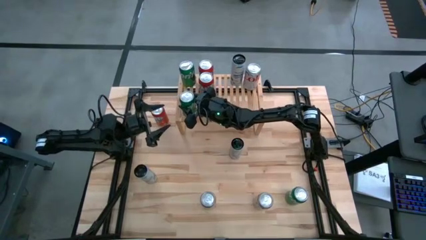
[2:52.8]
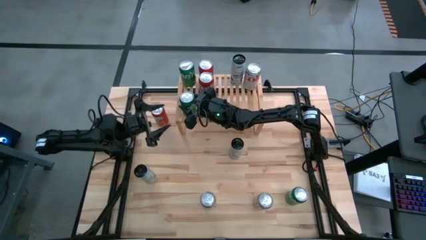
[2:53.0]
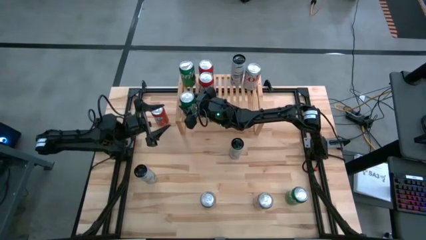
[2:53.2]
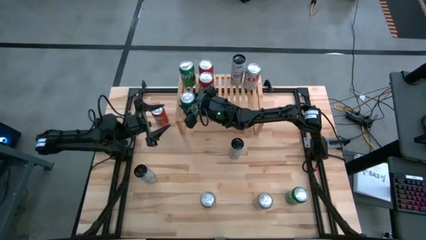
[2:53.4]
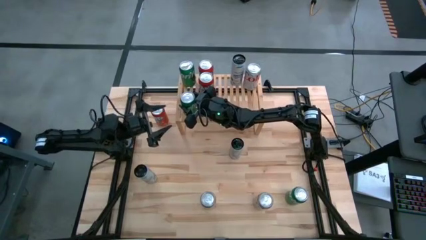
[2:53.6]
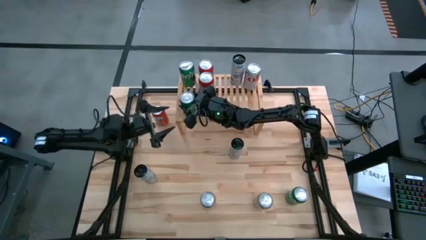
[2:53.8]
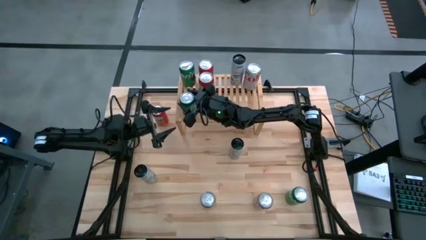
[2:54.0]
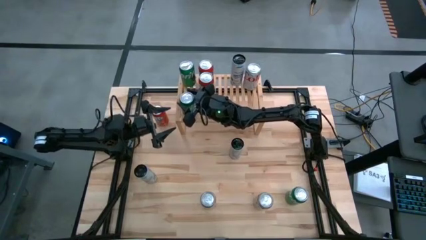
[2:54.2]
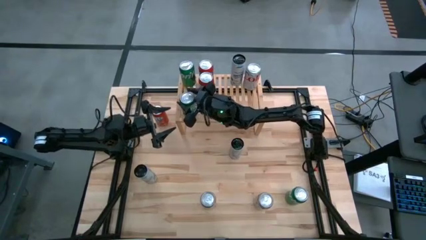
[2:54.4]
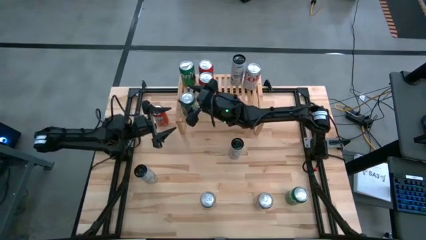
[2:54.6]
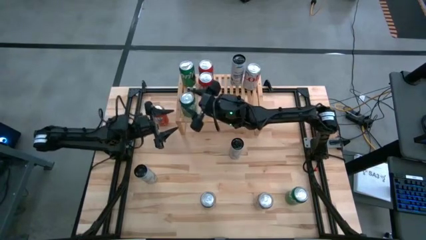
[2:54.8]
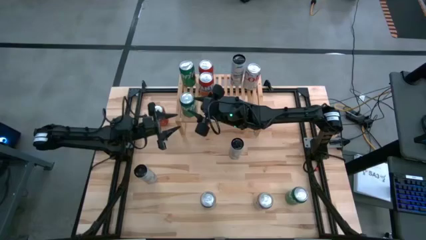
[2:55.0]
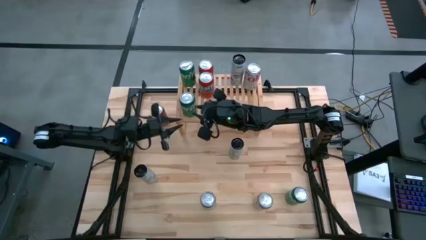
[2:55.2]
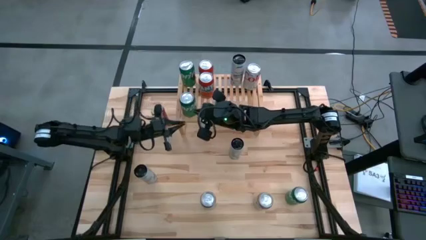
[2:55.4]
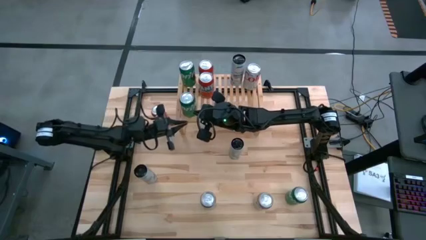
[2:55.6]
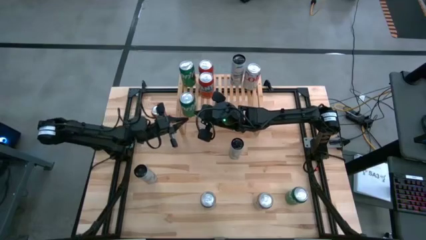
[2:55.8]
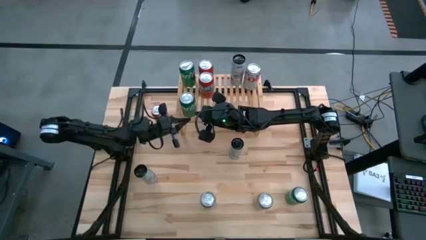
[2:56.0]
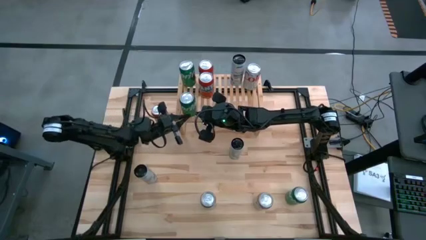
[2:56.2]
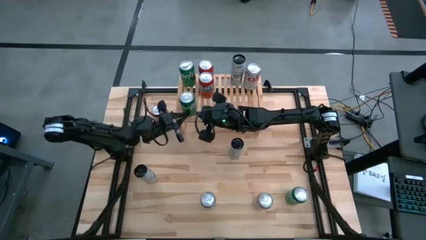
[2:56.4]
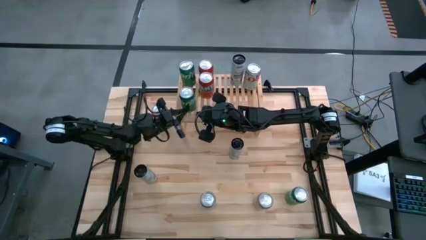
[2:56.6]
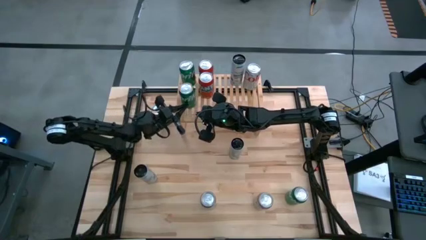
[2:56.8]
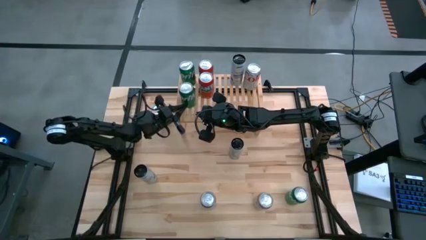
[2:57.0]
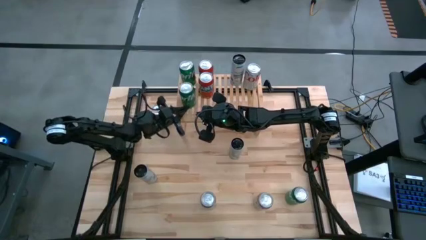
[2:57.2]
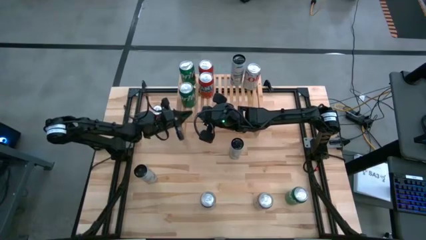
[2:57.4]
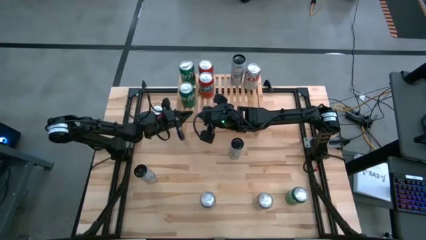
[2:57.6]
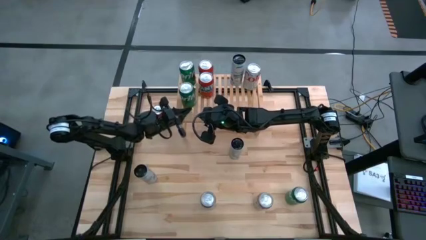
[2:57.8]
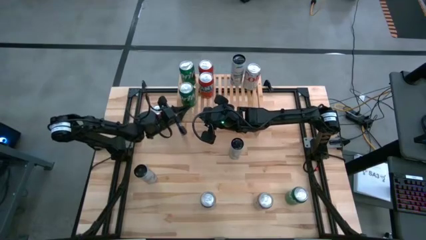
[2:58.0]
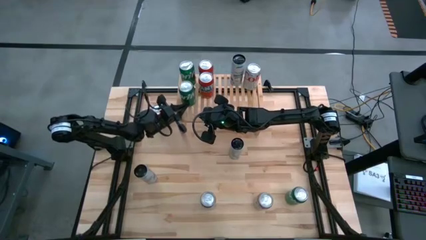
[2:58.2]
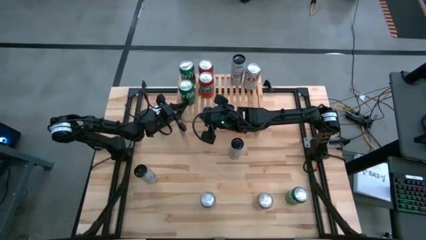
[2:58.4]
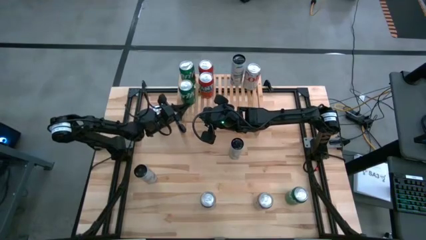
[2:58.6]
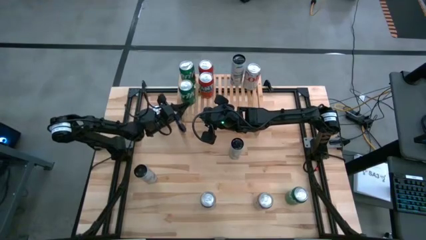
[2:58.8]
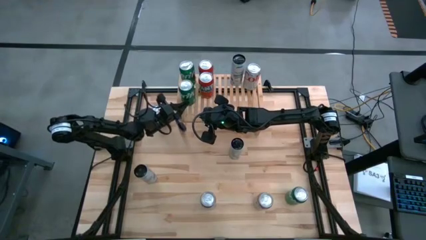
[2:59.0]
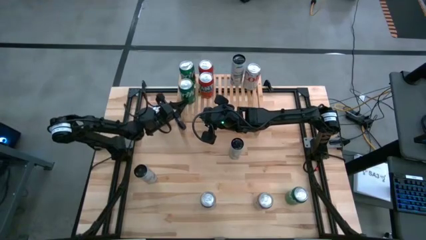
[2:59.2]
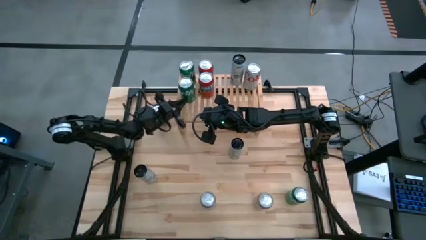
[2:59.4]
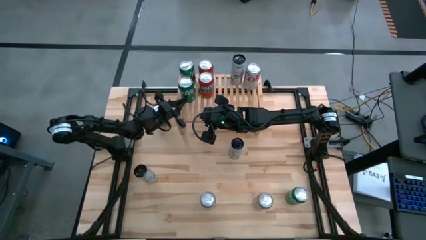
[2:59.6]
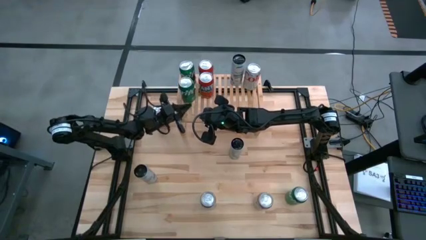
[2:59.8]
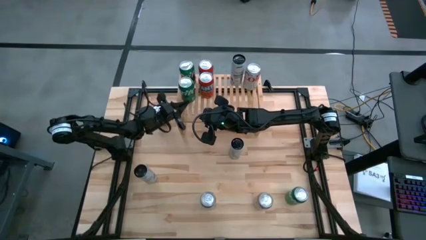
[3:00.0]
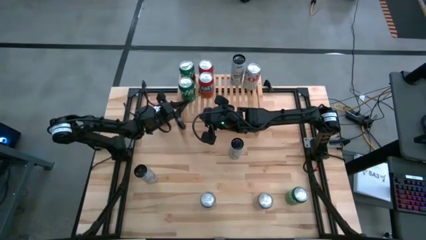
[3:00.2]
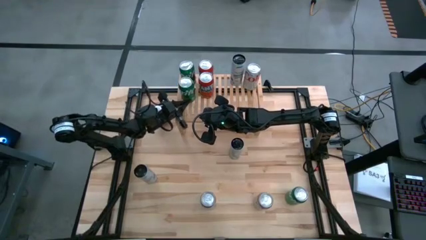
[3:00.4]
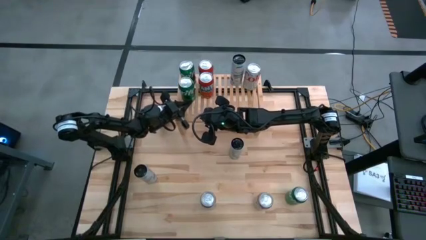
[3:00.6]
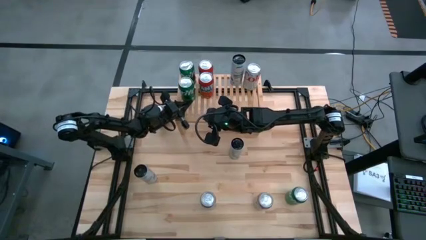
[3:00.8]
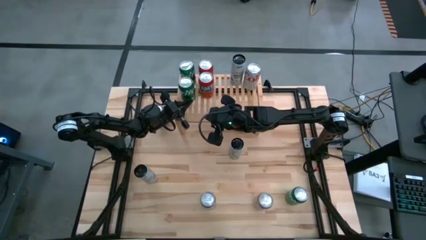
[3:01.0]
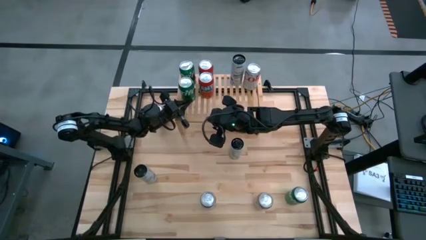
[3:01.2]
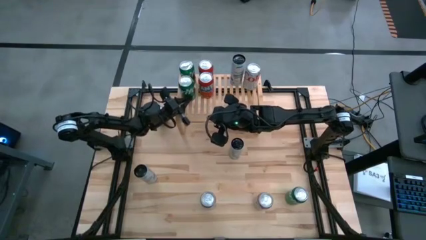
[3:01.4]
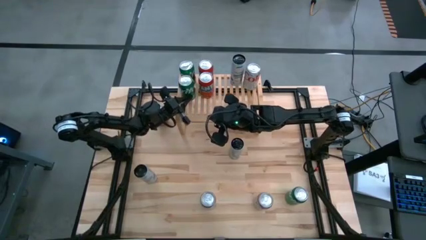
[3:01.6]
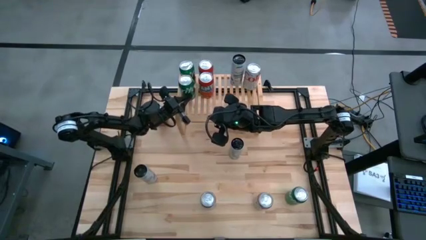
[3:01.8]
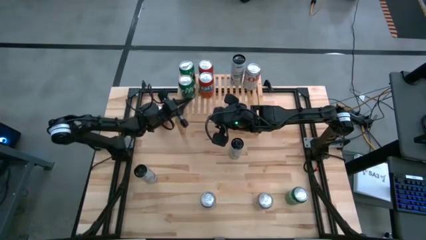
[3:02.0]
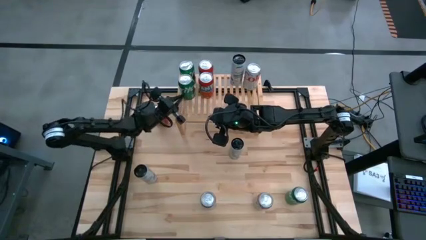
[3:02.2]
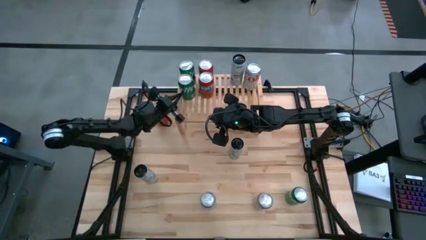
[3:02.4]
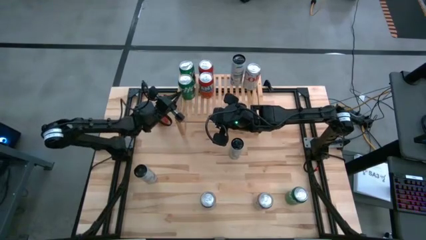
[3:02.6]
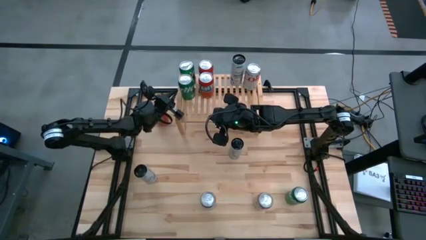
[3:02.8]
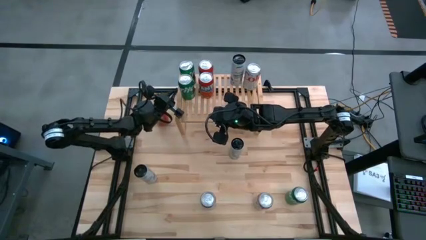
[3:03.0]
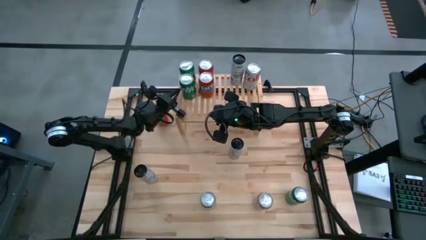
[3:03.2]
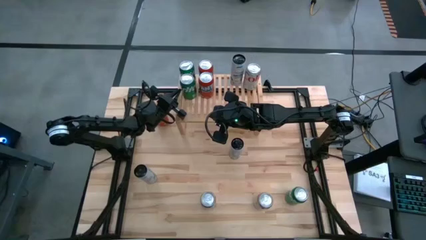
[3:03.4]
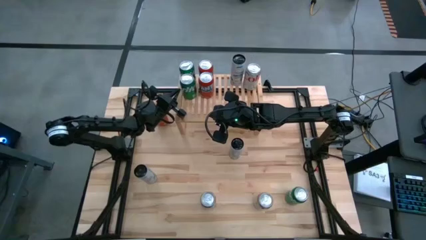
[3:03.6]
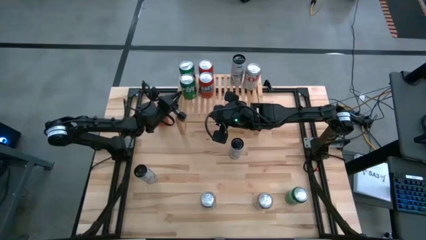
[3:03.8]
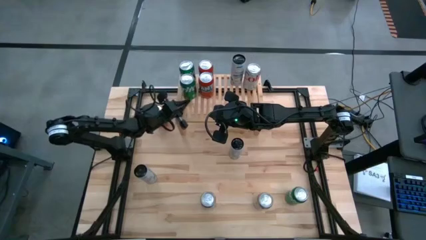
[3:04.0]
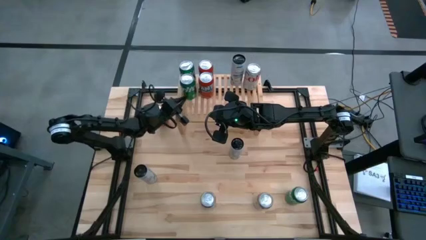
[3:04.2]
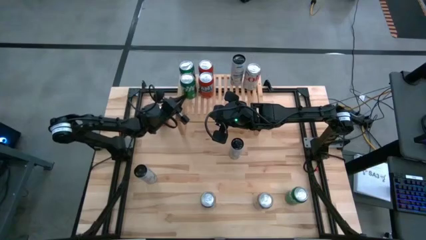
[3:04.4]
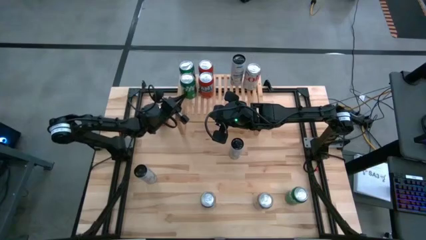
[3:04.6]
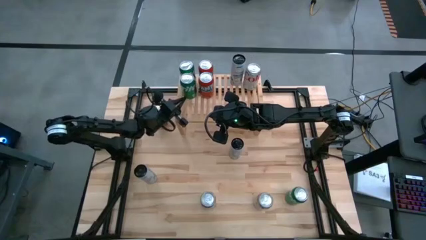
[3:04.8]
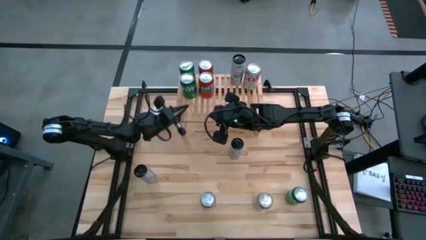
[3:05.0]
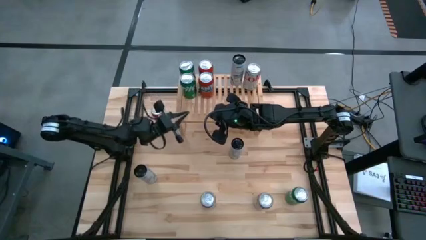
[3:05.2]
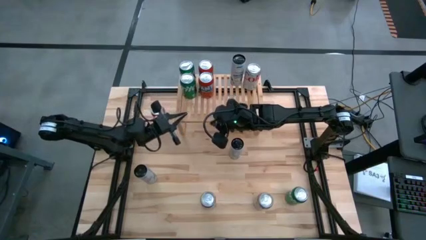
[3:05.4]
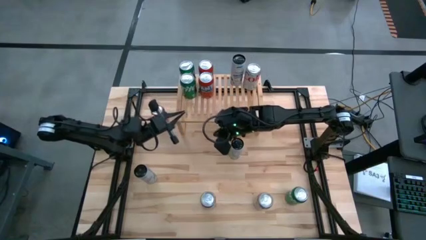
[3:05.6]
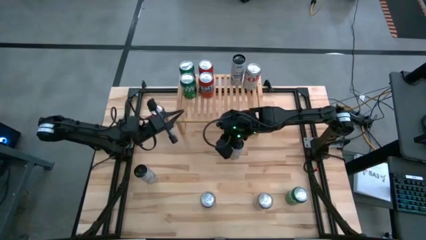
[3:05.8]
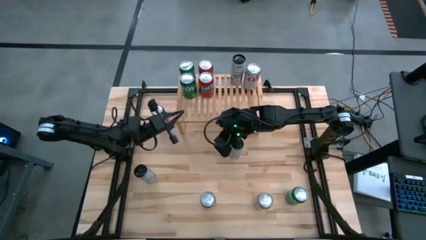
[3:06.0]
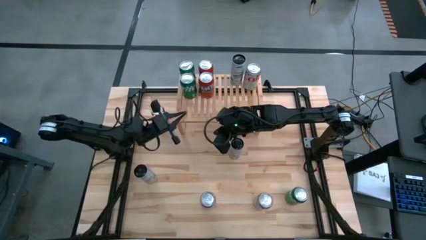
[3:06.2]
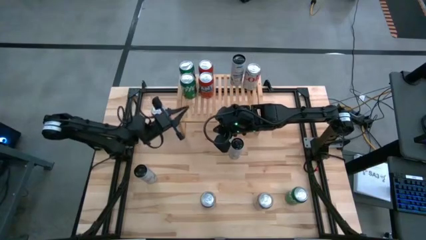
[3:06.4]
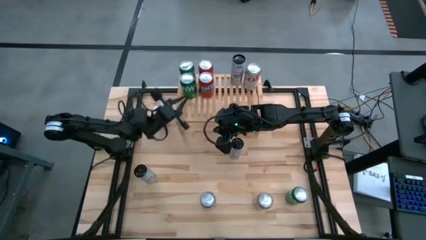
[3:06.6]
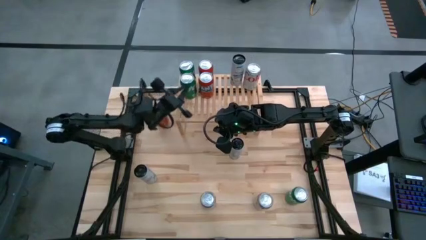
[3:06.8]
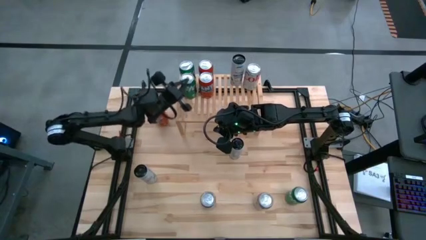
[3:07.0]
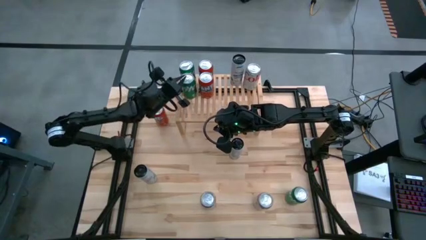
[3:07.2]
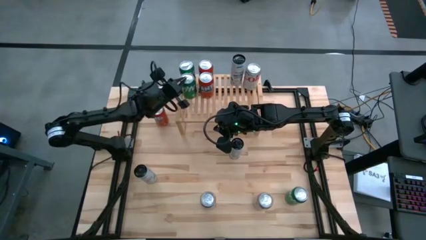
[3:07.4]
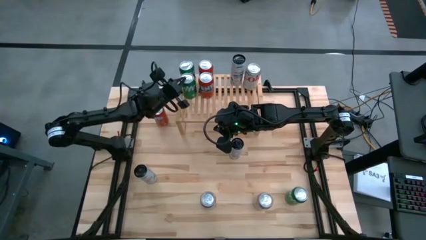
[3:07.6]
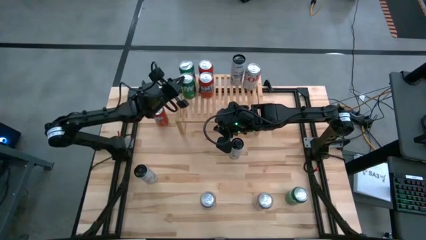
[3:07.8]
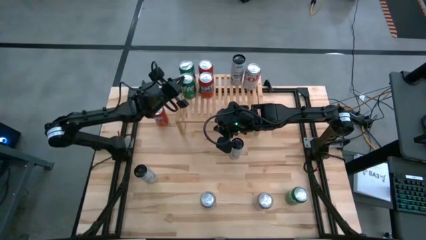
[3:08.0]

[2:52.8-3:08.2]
Task: Place canned beverage on shelf
Put the top green soda can aligned with the other red soda can on the shelf
